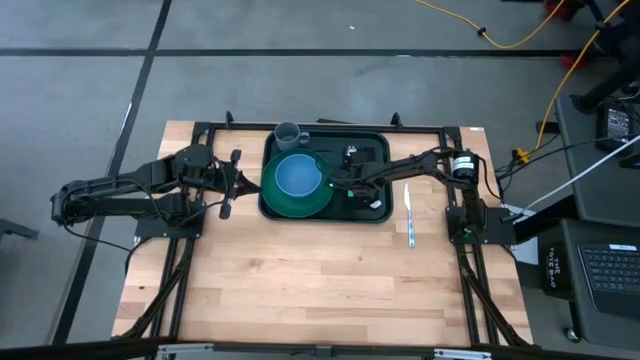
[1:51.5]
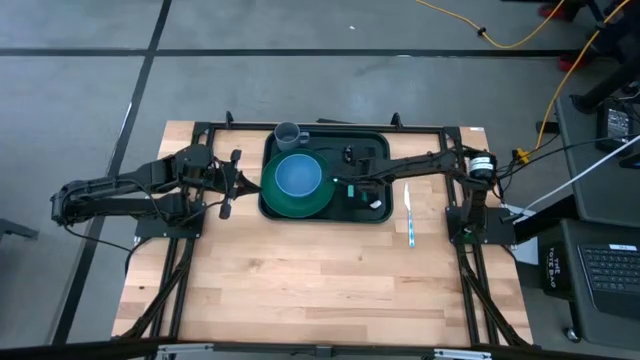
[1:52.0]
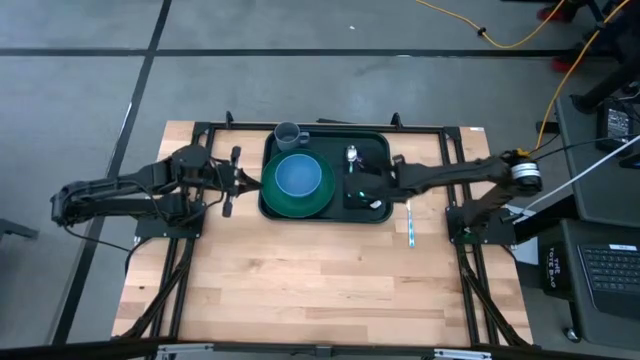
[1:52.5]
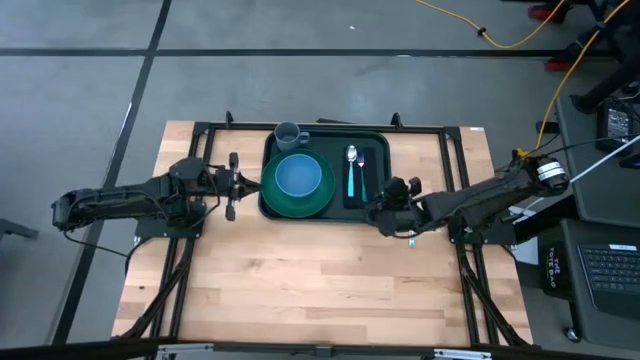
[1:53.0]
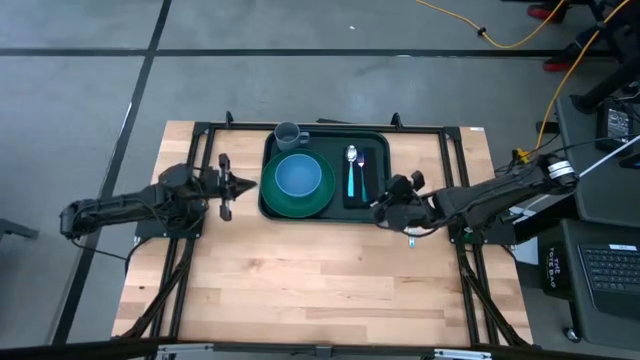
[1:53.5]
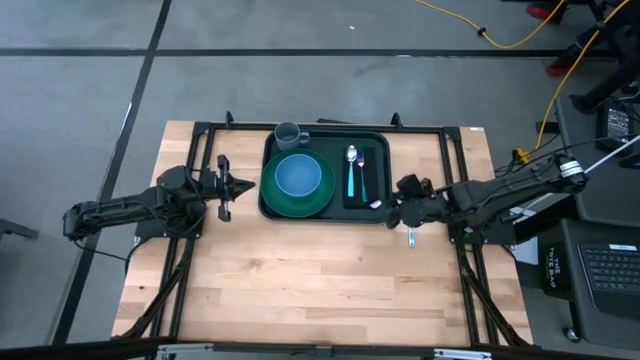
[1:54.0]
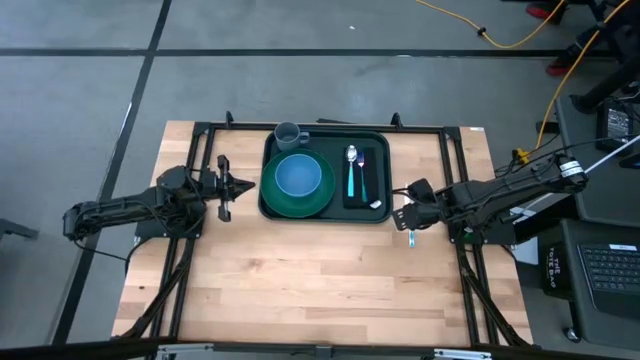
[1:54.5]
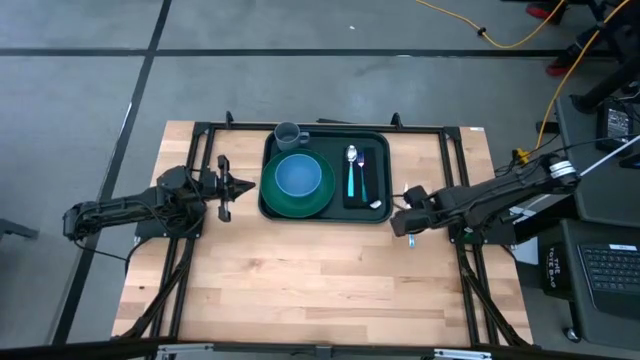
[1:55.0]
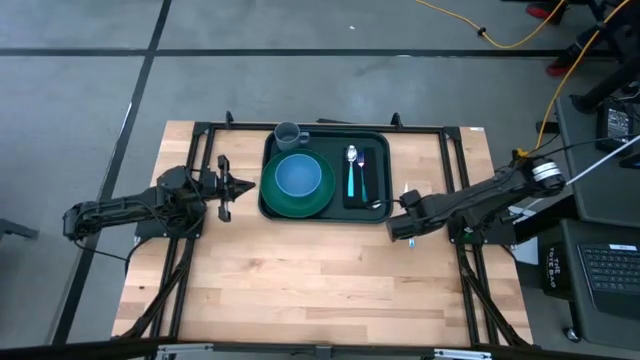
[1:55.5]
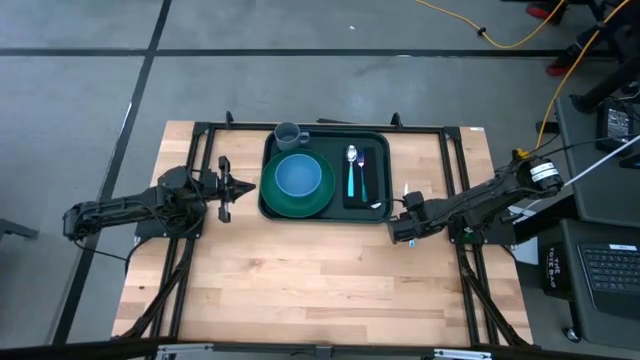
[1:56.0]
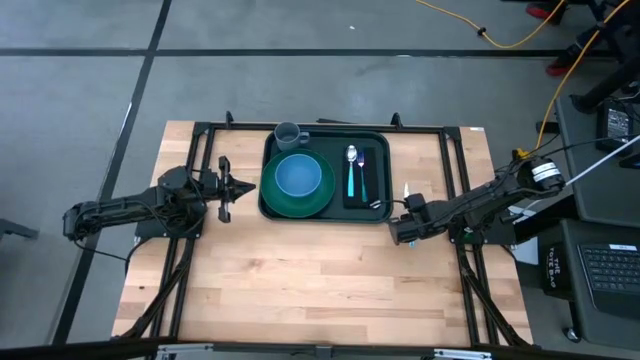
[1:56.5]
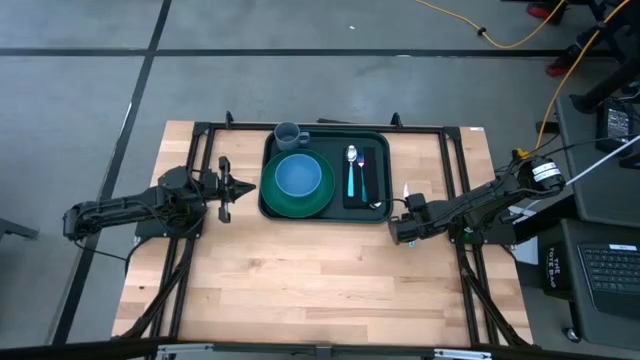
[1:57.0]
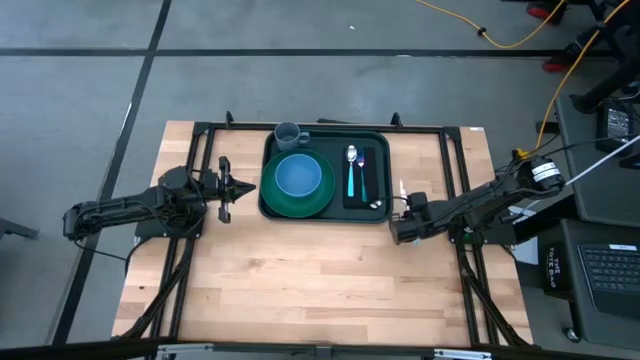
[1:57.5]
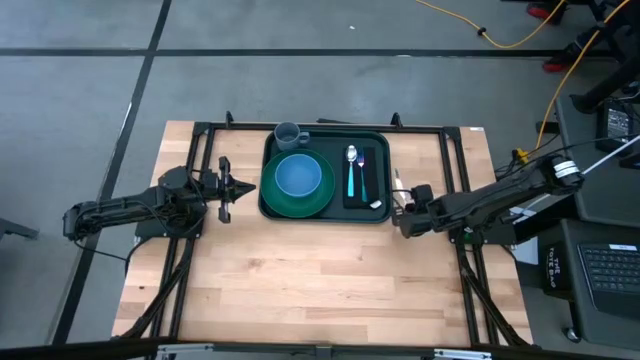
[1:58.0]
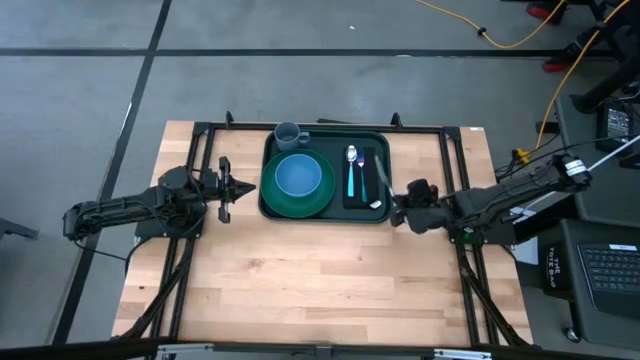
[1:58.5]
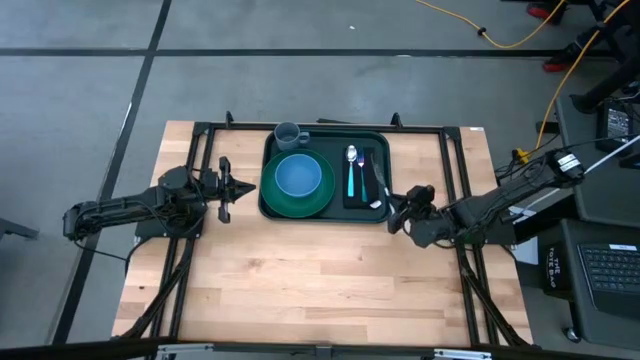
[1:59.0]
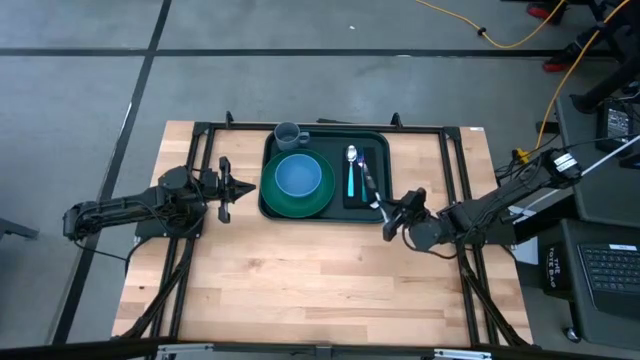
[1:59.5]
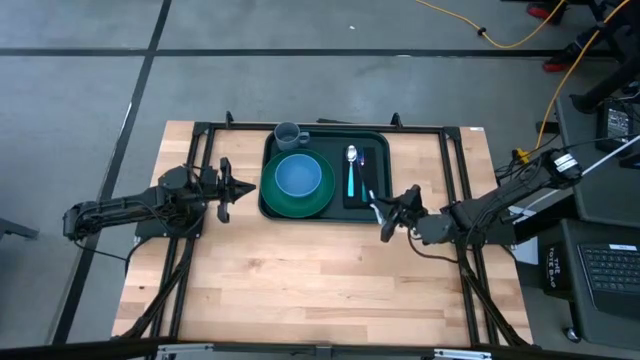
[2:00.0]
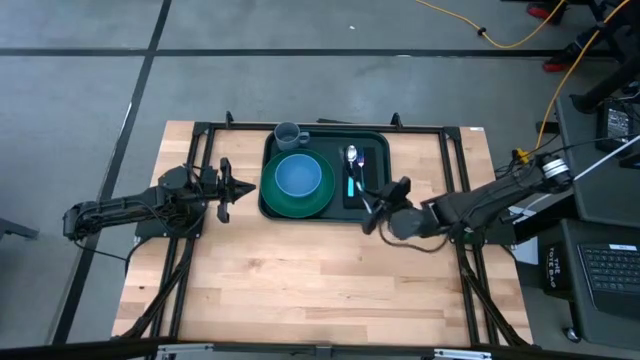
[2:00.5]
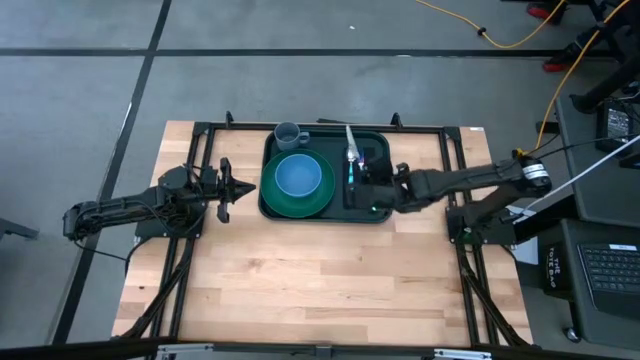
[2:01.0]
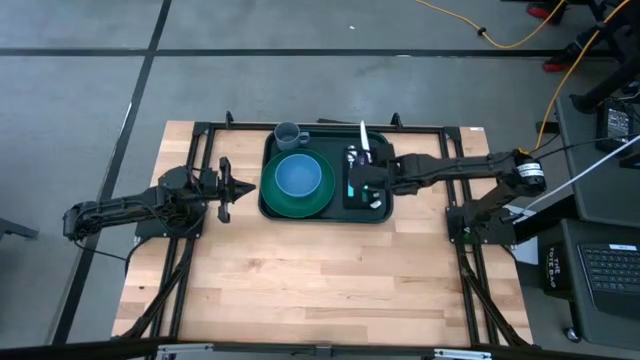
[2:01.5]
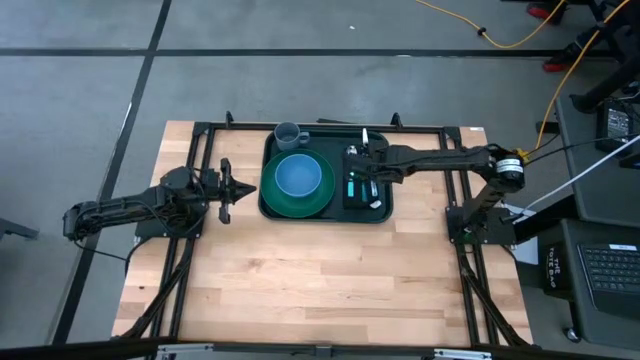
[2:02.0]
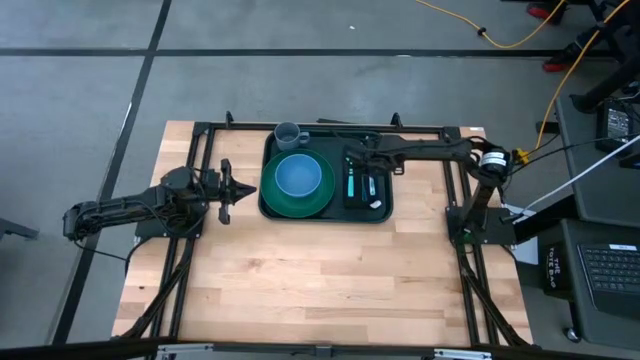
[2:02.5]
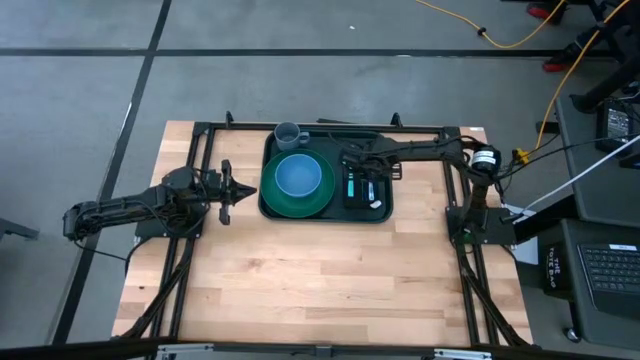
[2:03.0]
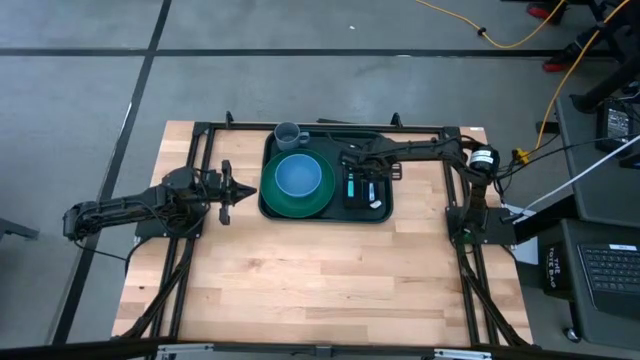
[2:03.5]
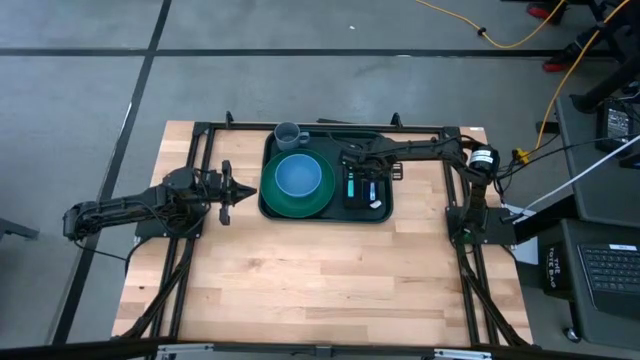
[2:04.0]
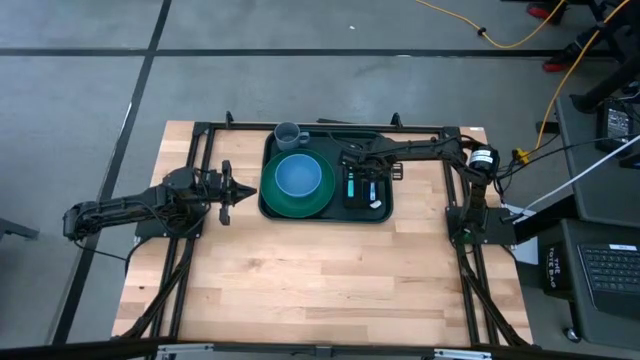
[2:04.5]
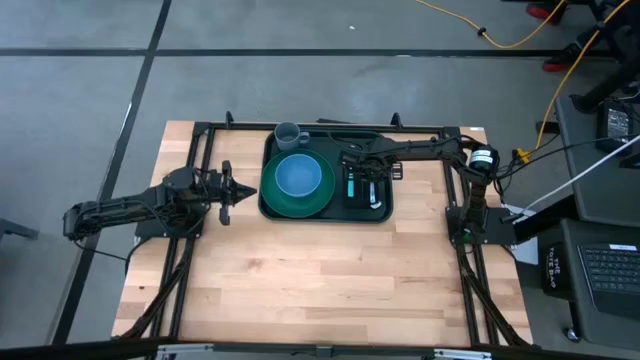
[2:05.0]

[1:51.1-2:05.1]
Task: Set up tray
Put the green knife on the black napkin to the right of the blue fork

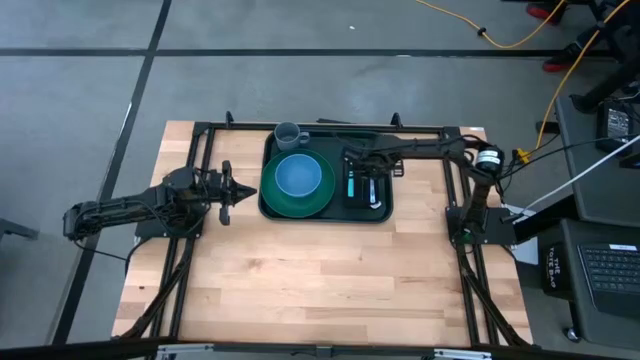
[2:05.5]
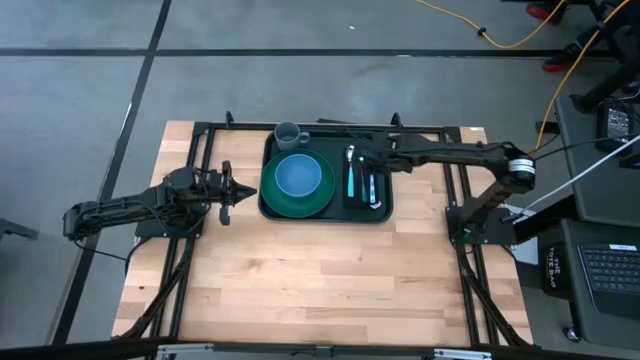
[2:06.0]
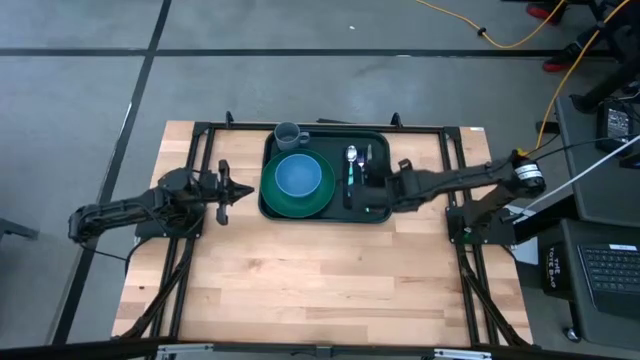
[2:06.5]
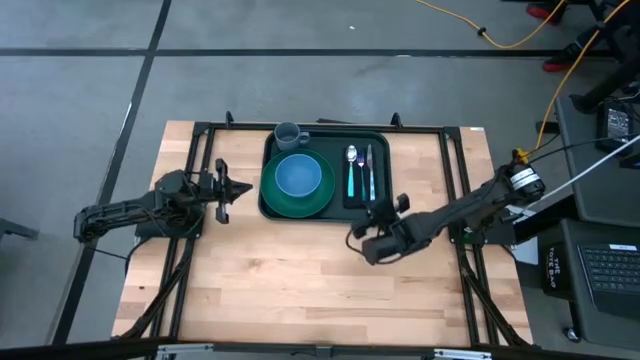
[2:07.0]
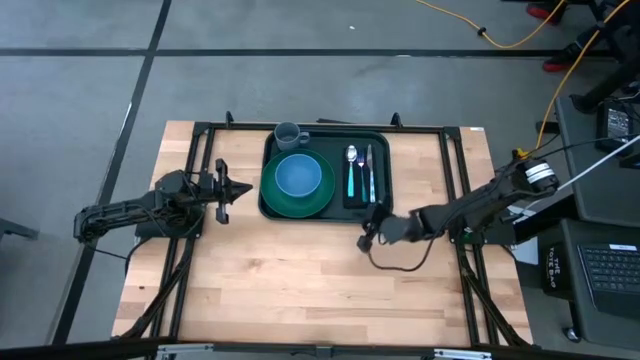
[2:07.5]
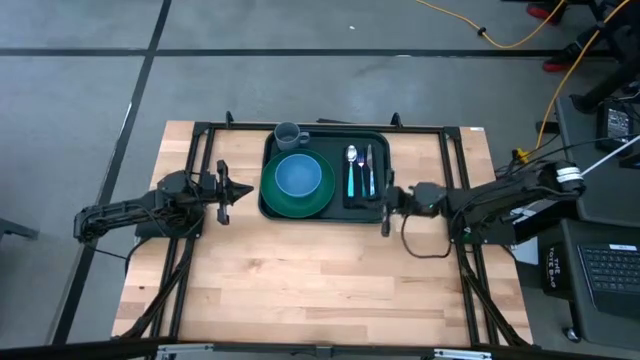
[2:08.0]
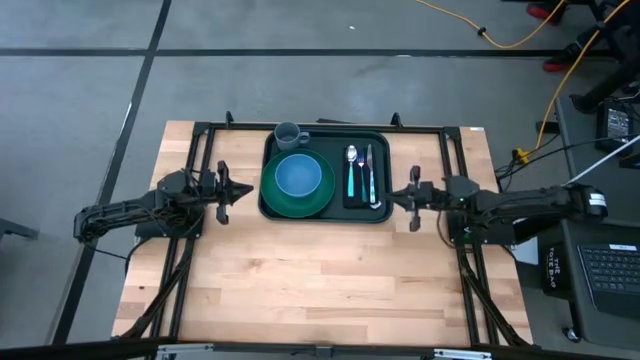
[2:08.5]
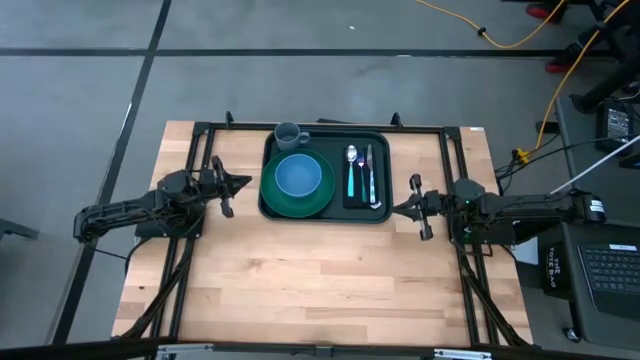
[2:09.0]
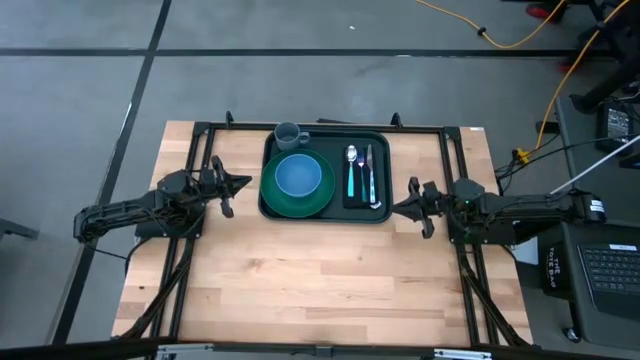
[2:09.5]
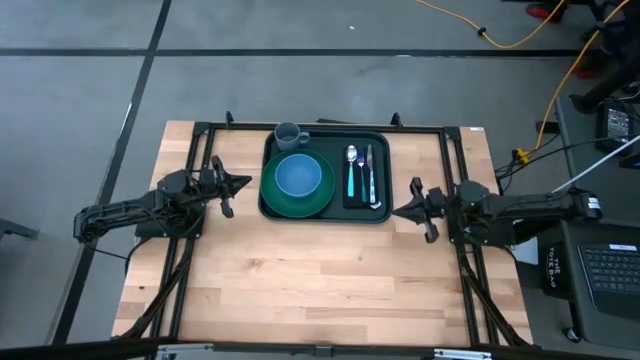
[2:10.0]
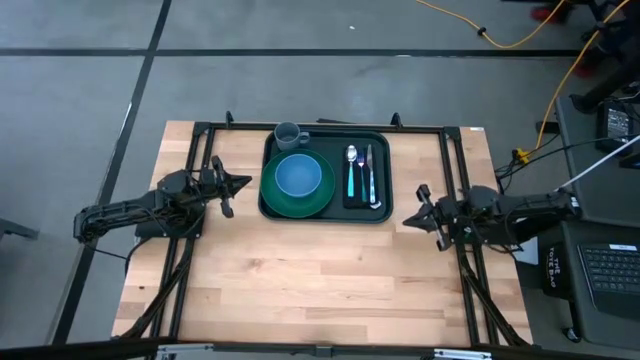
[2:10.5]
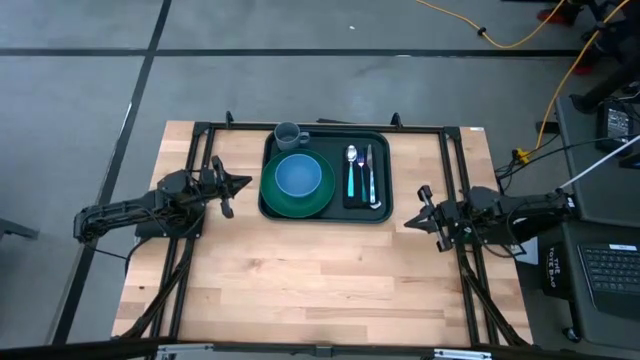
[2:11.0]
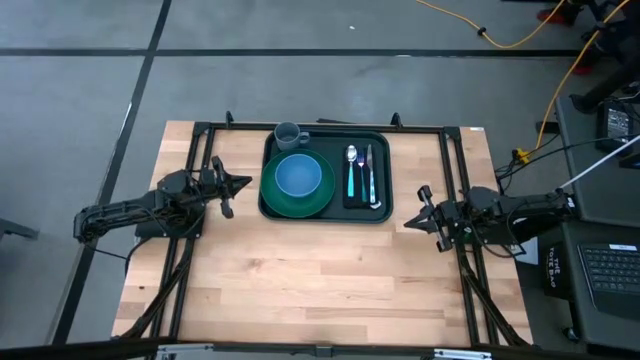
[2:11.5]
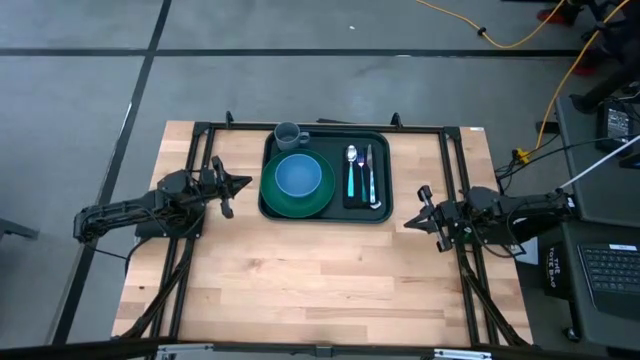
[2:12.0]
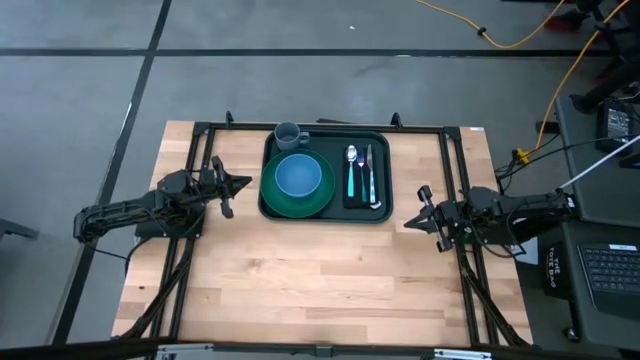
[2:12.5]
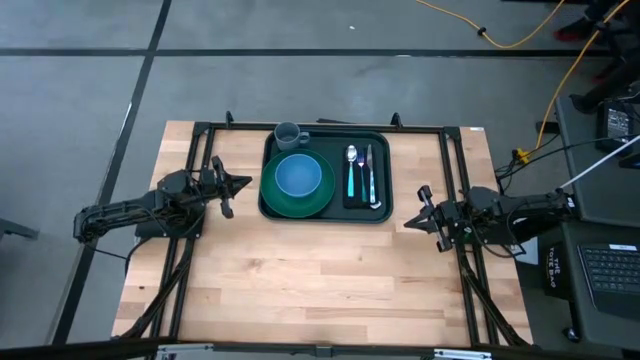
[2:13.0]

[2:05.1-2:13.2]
Return to Home Position
